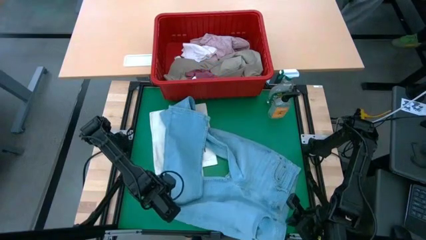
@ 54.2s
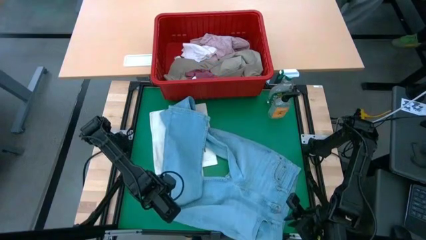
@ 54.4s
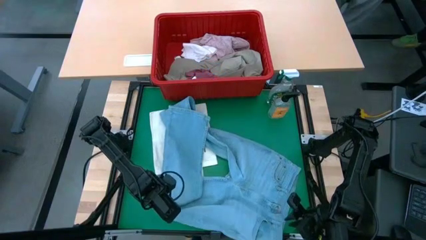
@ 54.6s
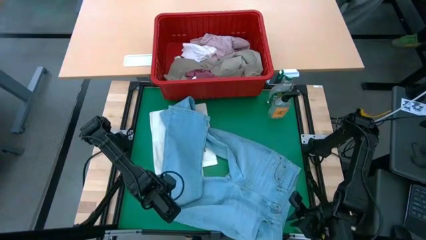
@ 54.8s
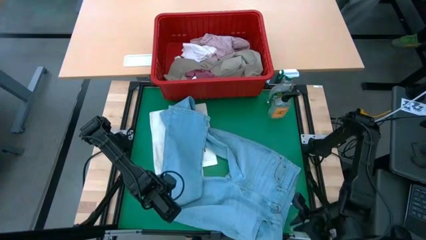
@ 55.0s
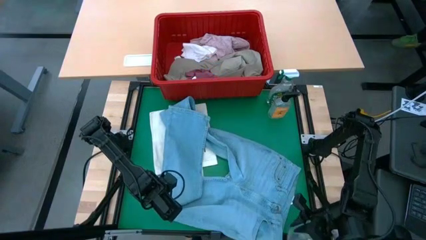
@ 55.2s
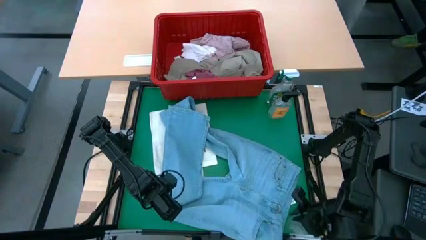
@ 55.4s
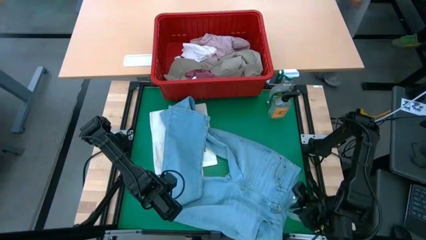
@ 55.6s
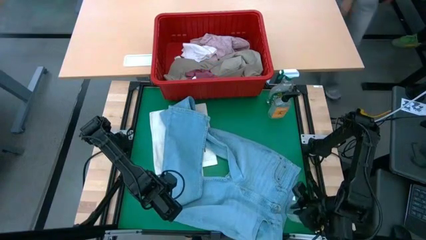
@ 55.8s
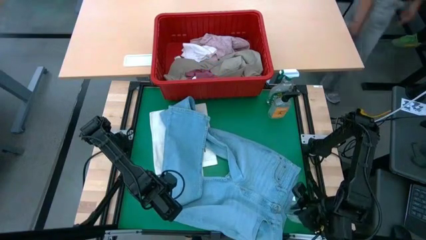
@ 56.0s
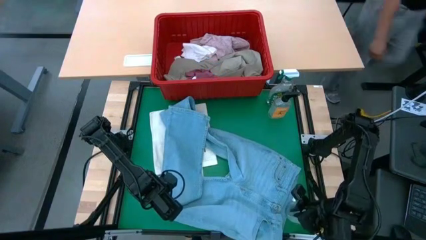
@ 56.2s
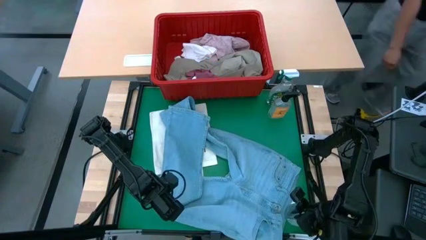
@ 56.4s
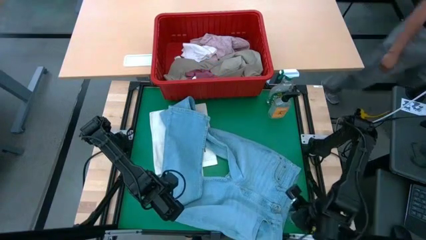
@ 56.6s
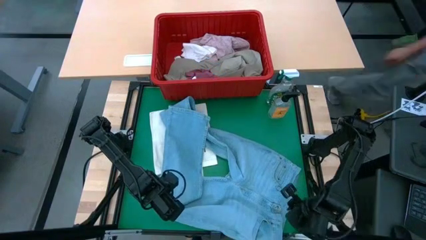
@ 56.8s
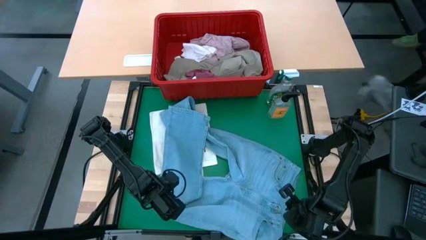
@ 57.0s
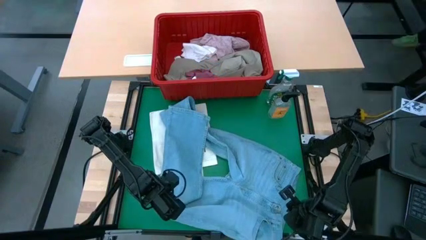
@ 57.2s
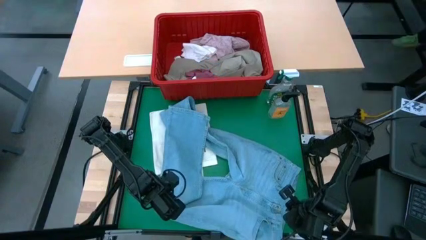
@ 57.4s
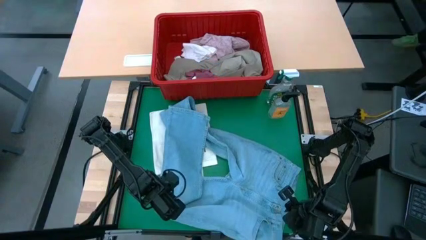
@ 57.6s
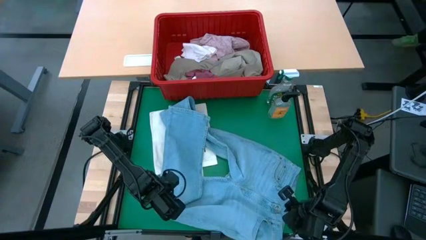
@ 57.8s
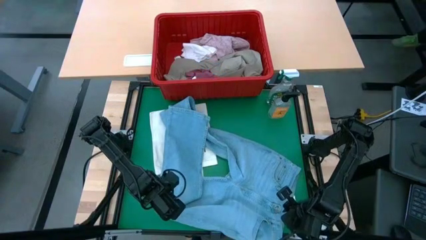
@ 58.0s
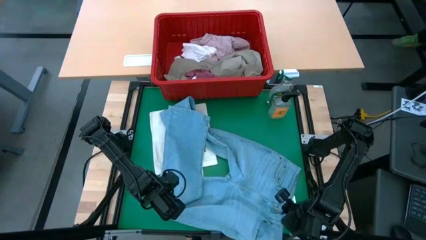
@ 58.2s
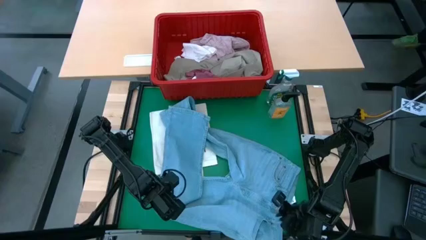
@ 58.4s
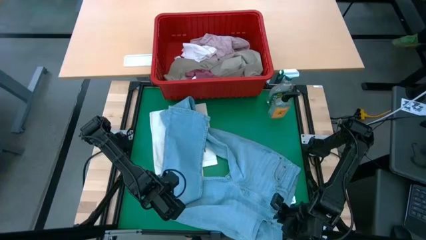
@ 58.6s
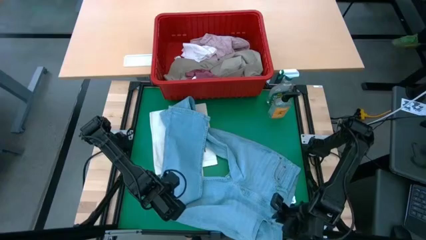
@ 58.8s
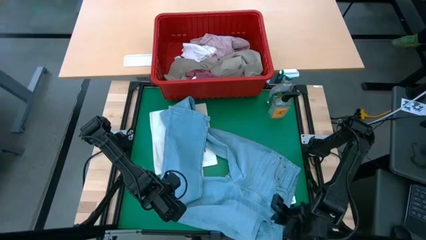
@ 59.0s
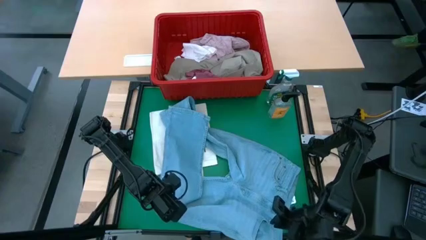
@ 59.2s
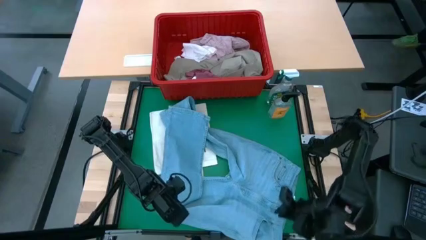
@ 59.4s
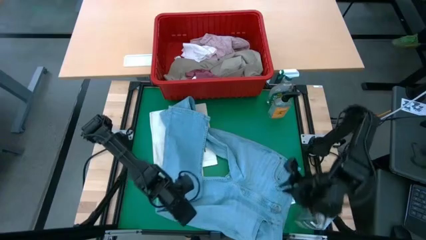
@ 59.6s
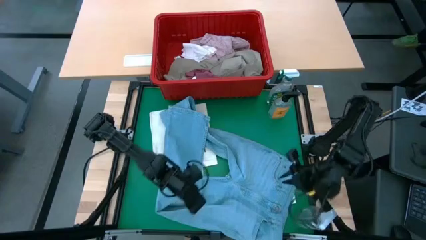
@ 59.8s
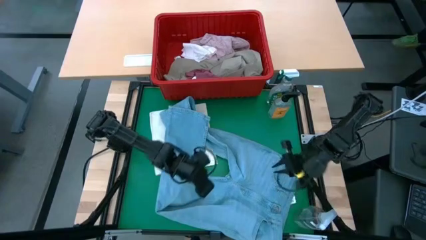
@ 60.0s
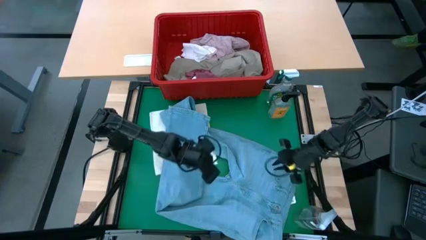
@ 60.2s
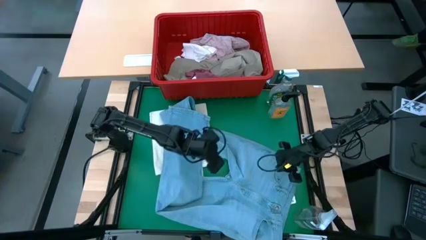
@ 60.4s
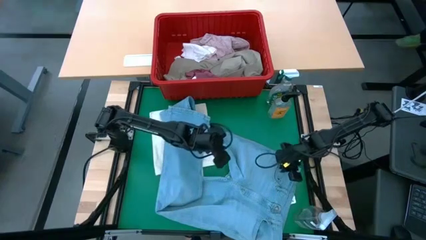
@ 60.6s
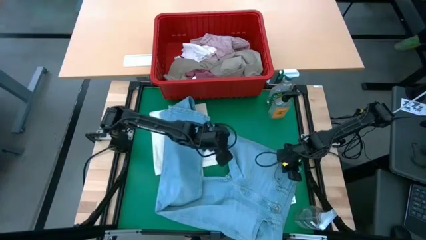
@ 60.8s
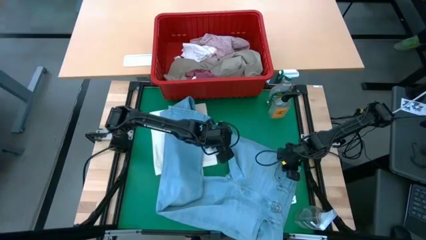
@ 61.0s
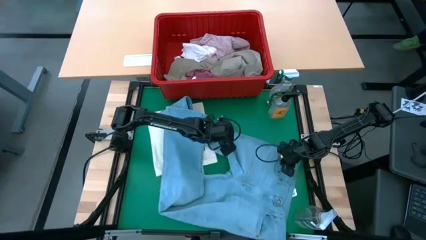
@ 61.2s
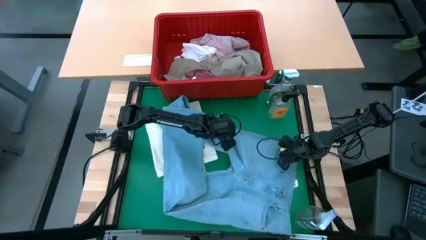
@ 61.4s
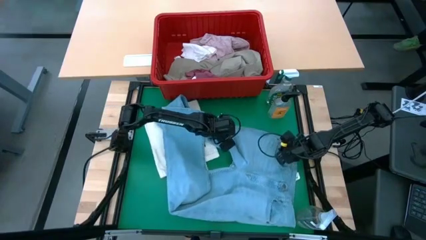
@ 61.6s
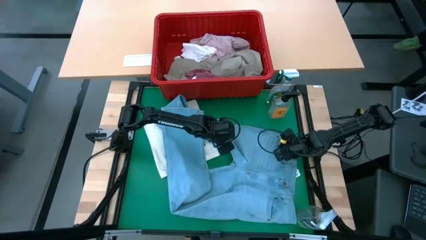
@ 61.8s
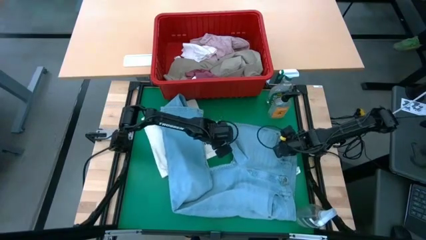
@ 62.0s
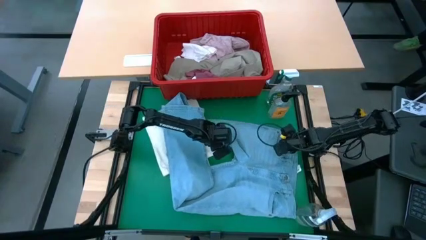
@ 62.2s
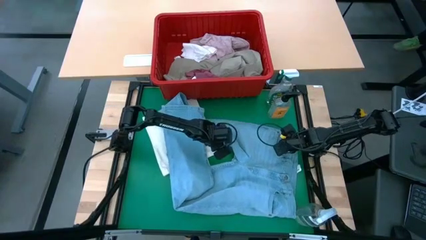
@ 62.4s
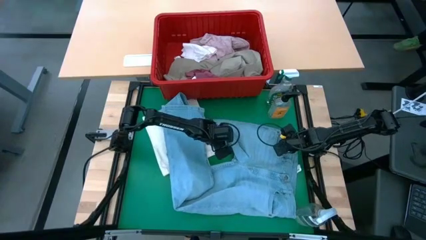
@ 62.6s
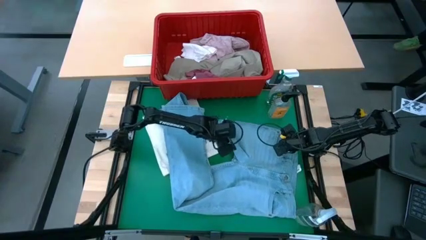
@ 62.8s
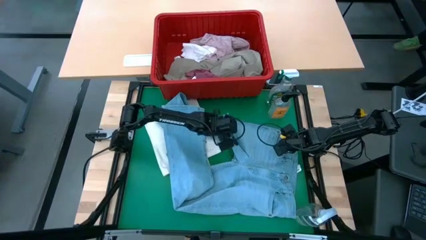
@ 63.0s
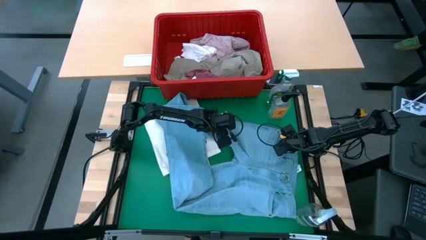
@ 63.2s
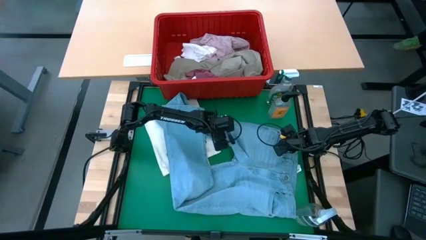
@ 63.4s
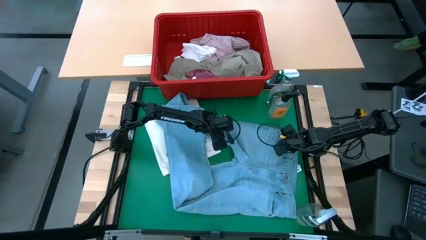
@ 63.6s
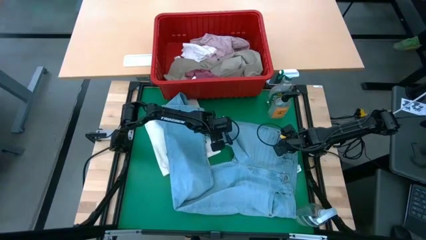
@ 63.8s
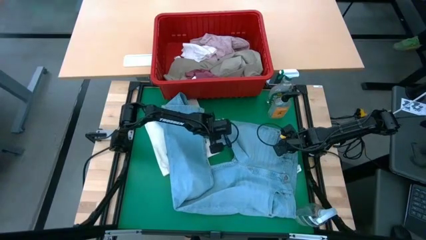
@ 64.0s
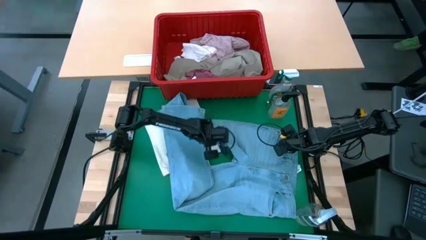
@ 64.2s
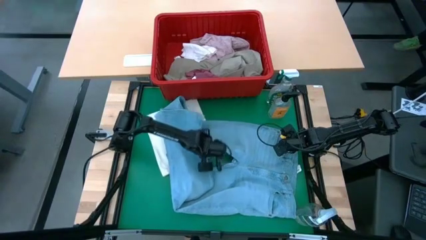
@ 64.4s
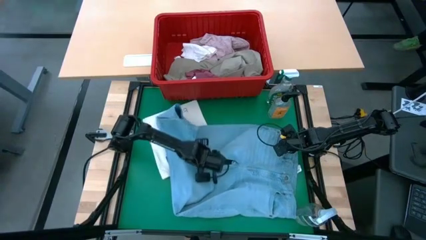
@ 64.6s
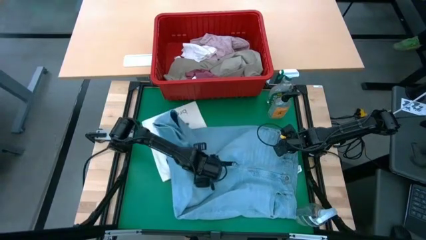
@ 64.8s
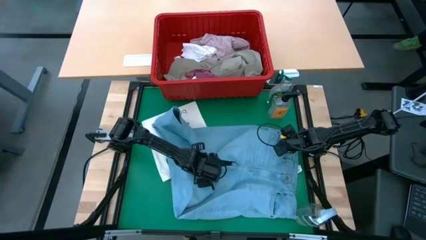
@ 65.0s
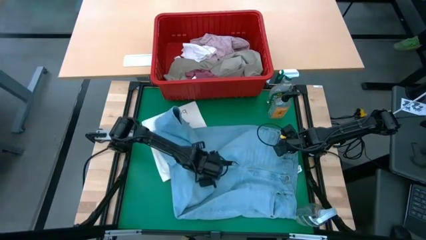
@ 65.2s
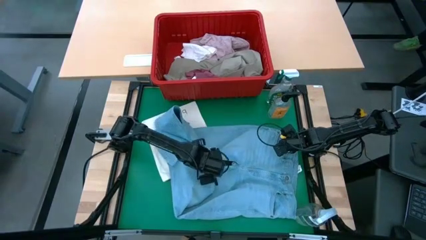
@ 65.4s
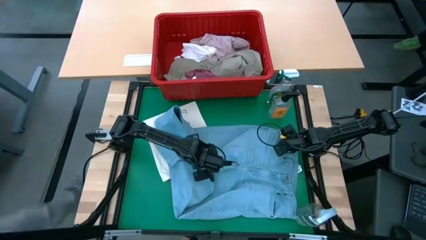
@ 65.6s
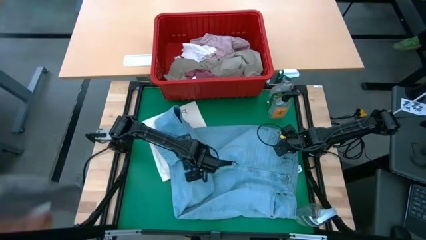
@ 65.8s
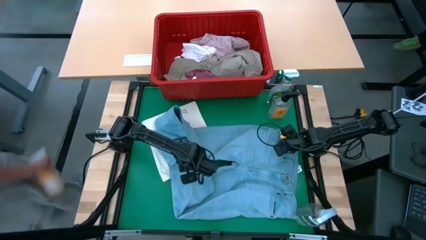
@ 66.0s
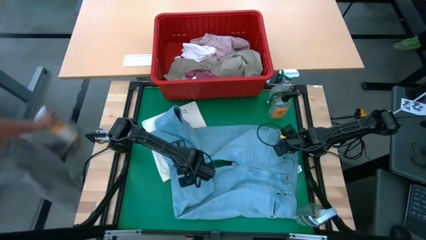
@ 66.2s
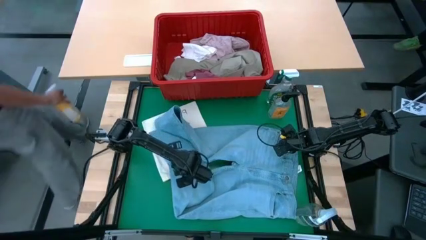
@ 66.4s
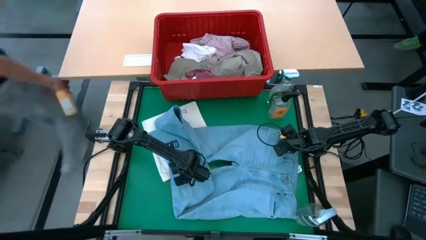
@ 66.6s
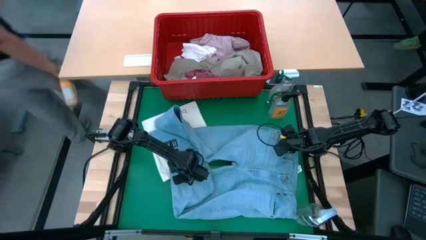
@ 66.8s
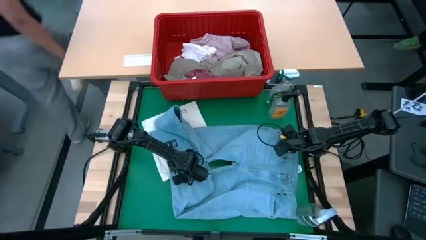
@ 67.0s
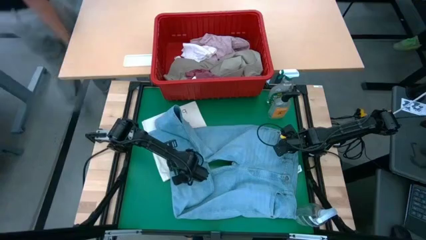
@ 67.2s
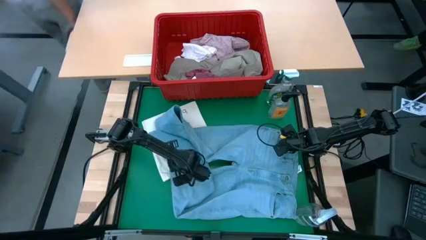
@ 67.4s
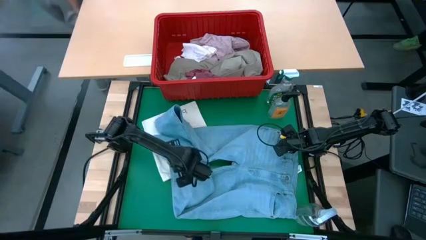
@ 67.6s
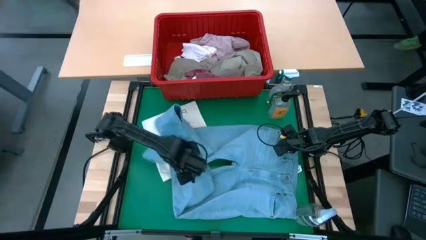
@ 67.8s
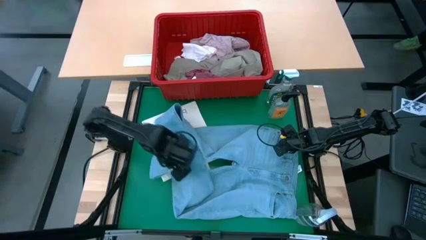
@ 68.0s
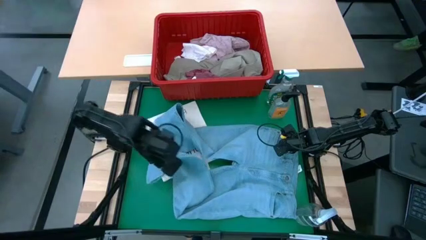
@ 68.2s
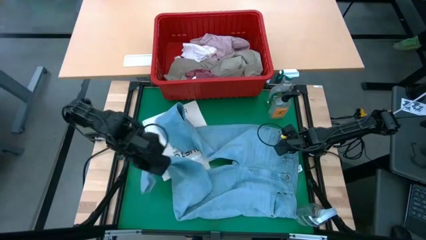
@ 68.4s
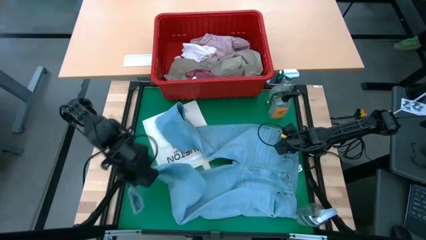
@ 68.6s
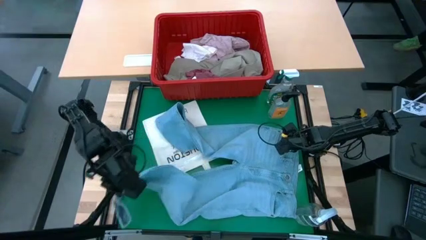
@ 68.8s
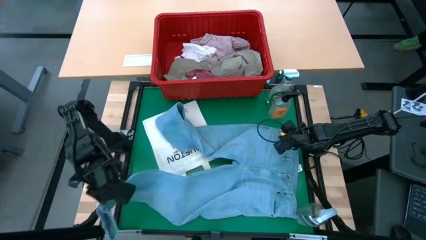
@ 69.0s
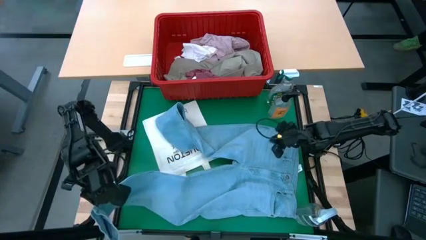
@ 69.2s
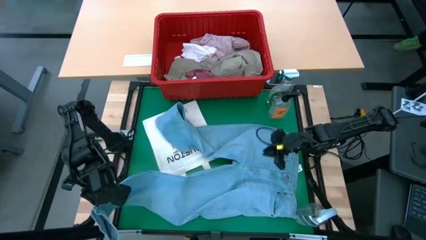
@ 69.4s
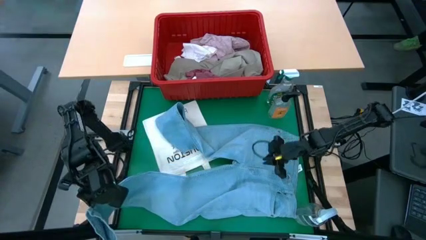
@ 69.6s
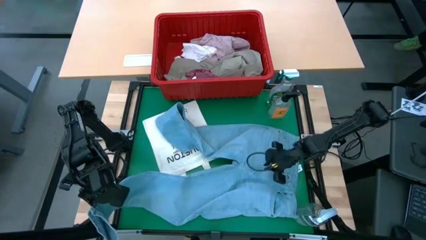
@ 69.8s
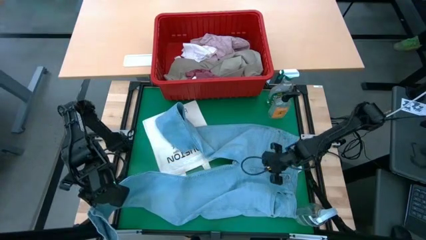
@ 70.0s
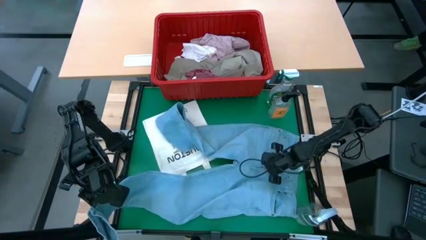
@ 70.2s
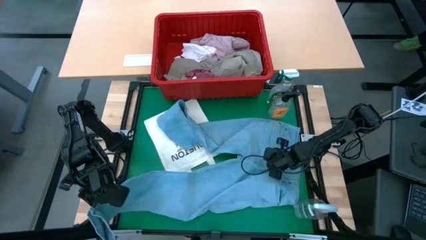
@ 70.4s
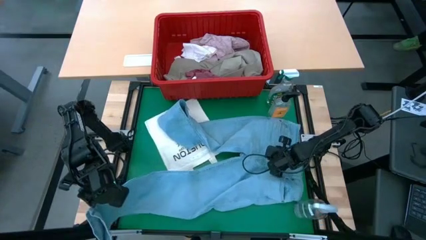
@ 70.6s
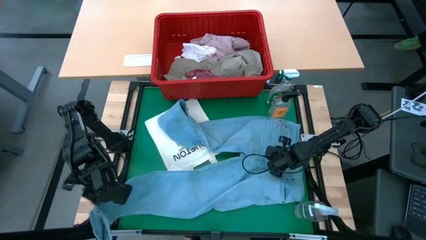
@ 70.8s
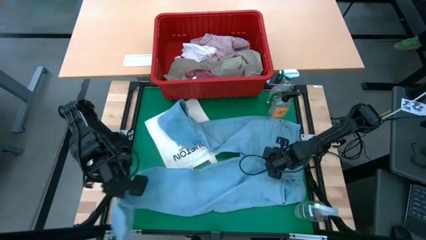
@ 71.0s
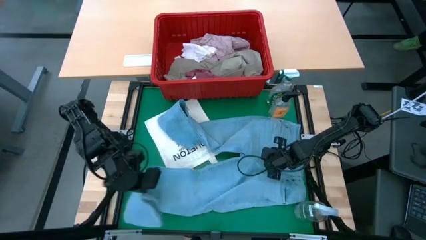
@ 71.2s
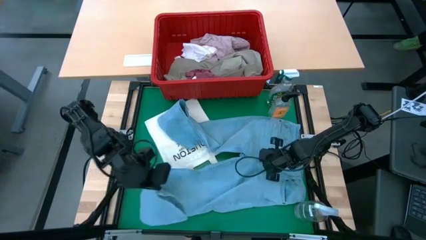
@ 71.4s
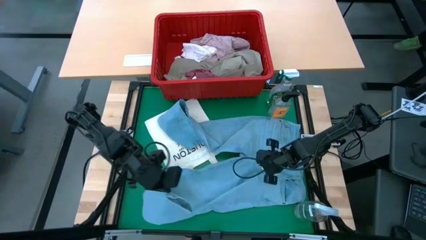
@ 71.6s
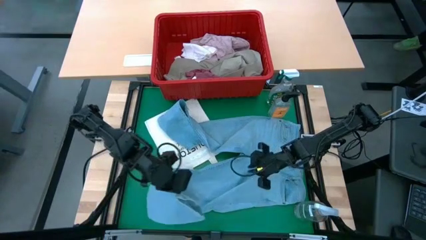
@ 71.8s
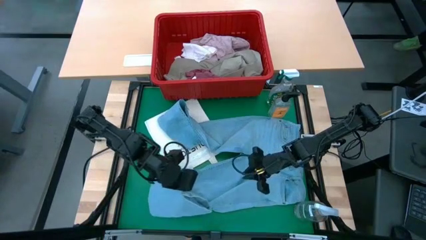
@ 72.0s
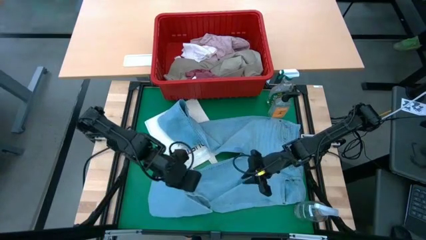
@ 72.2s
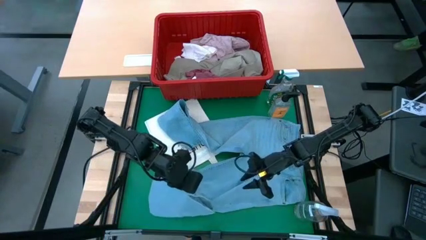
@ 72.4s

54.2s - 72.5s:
Task: Fold laundry
Fold the light blue pants
